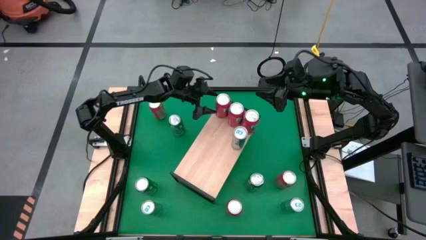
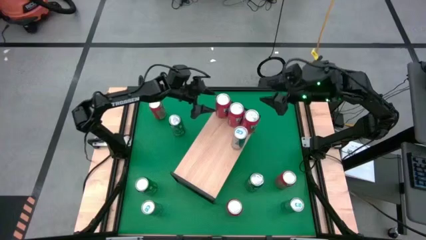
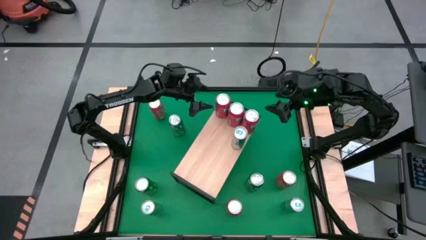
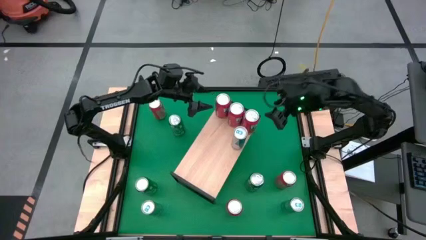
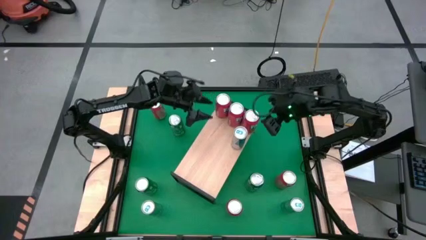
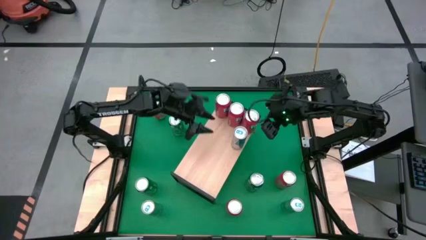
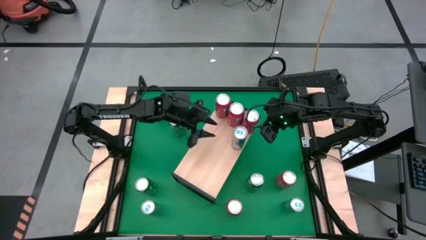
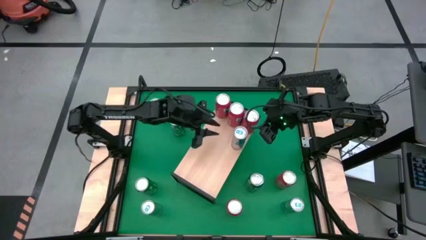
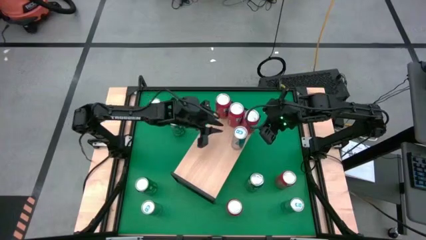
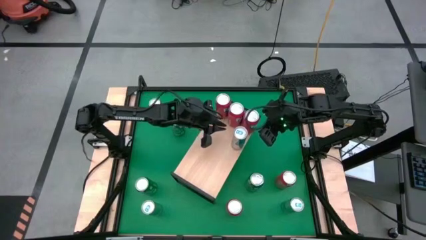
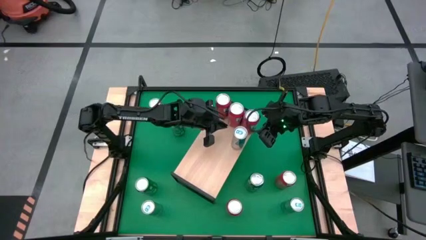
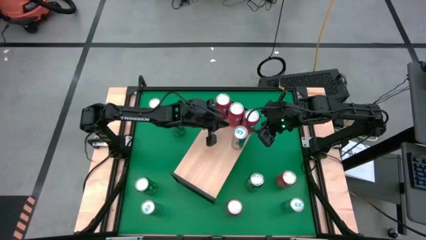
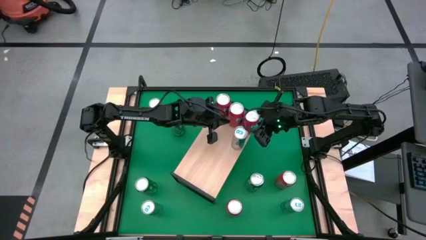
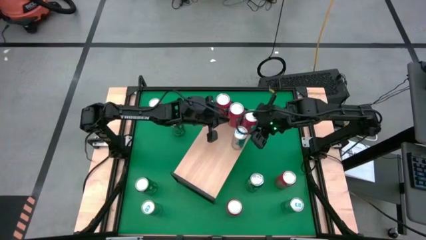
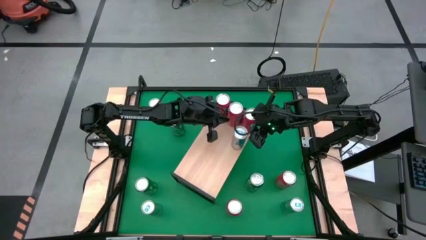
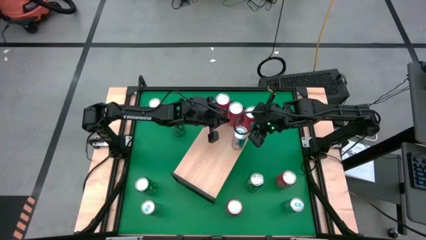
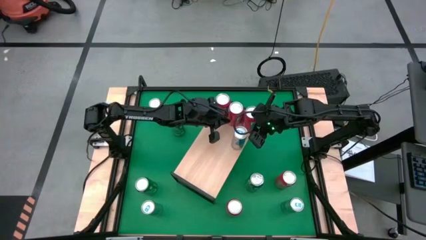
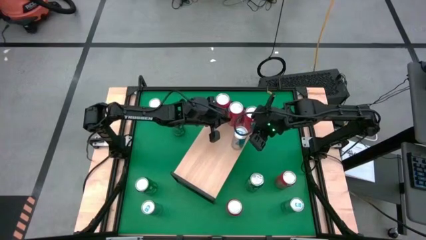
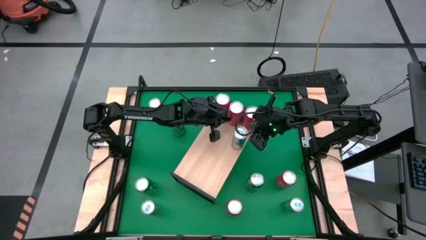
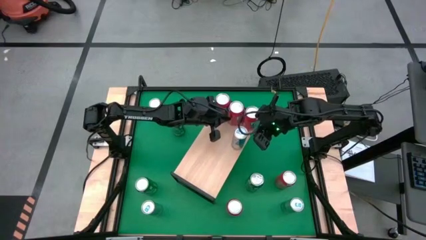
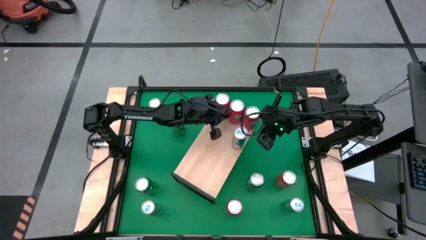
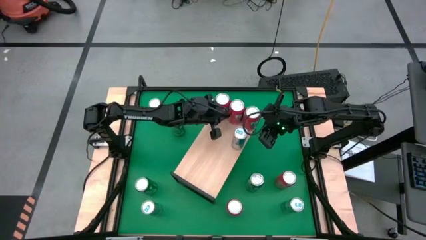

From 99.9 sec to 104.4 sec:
Task: Sort soda cans
Adjust the red soda cans on the shelf

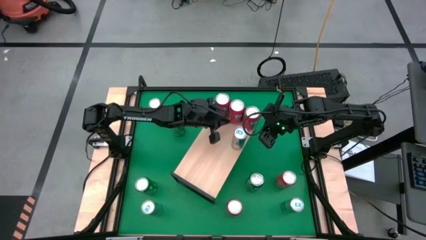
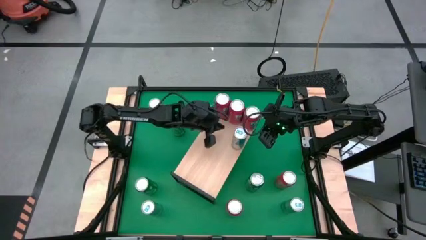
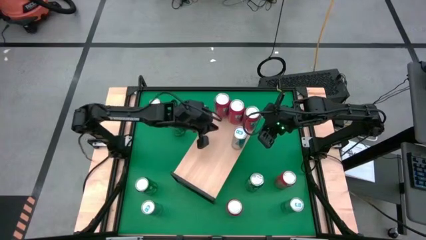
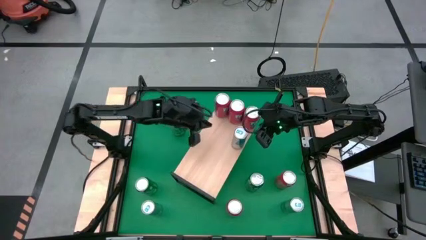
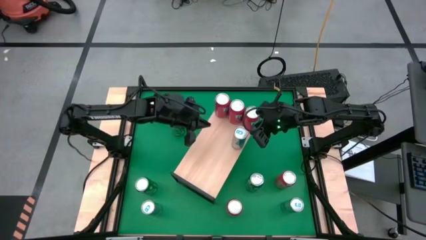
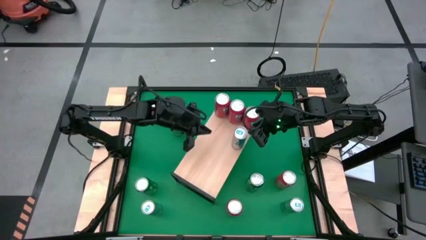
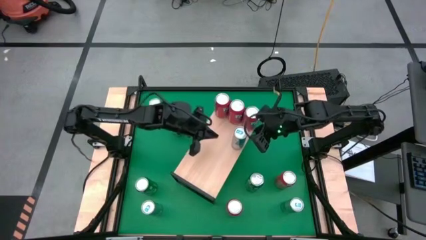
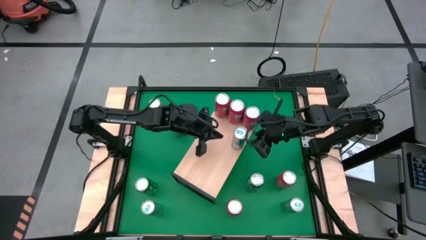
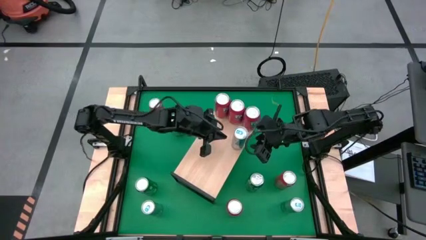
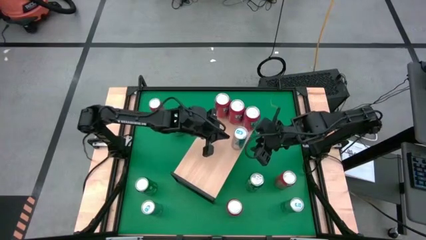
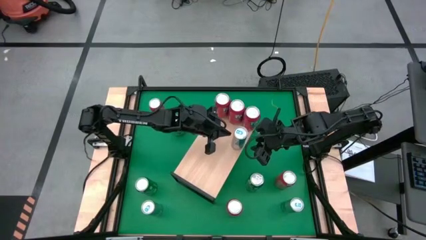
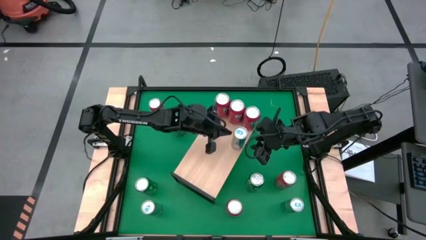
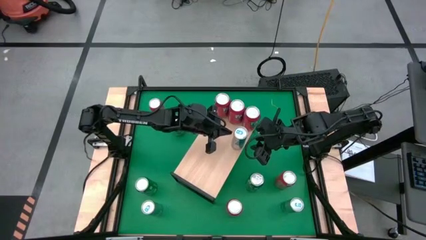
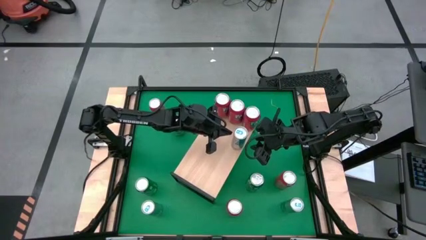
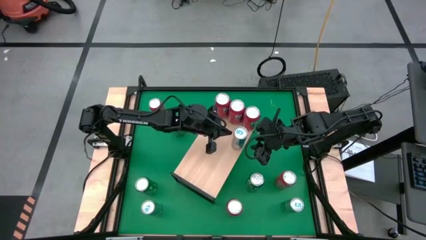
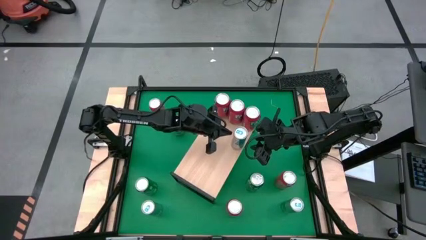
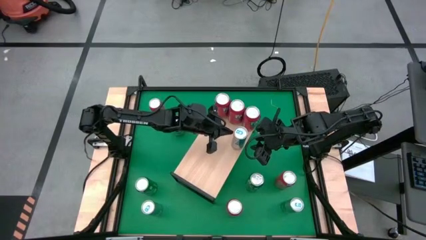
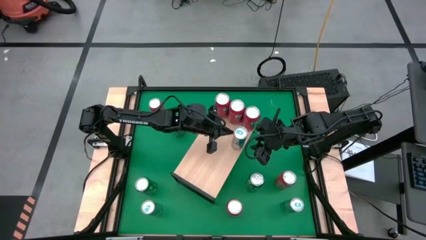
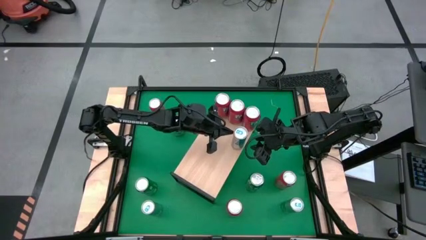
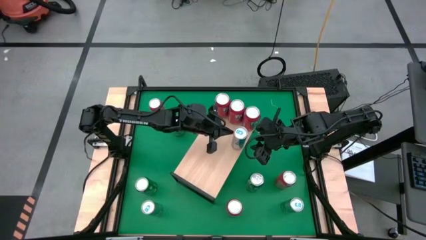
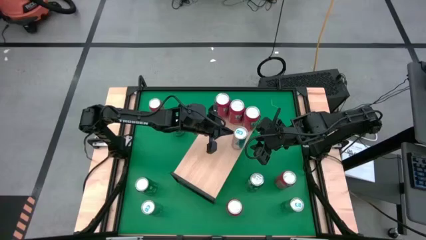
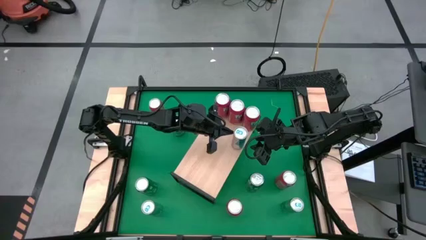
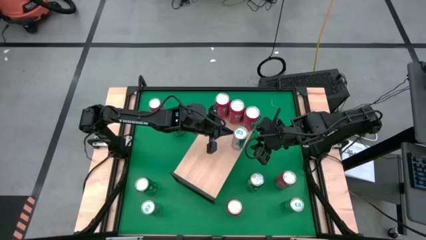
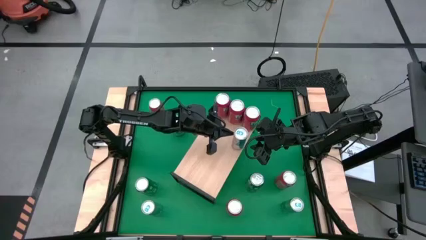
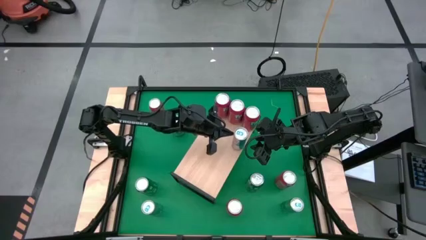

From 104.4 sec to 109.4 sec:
Adjust the blue soda can on the shelf

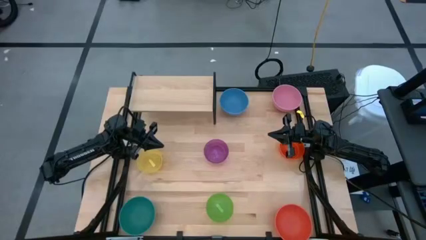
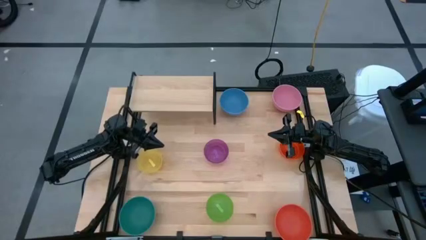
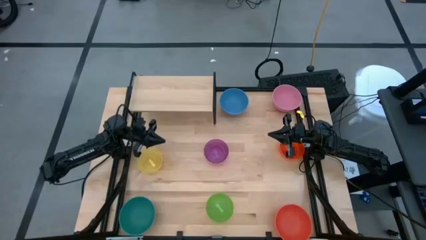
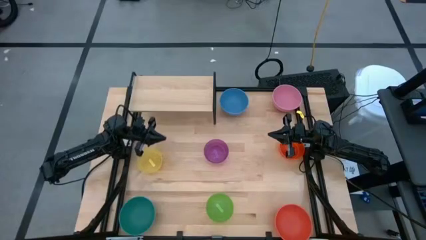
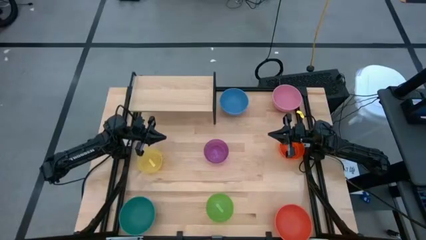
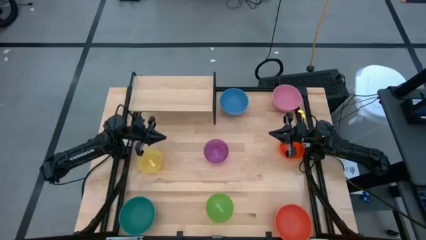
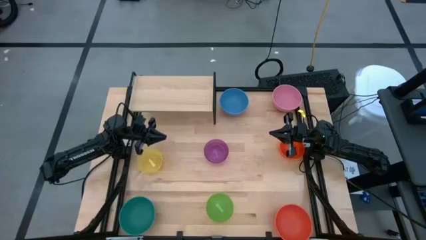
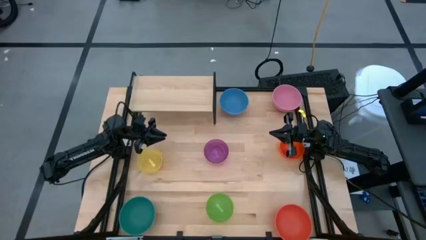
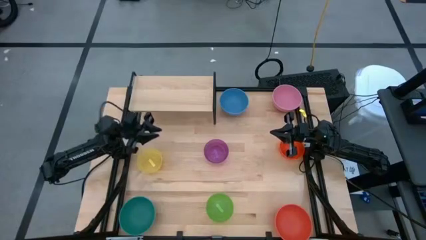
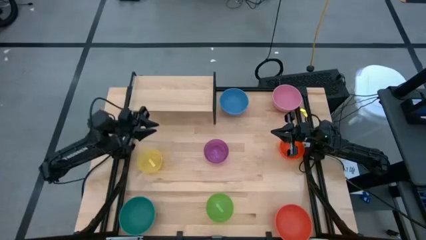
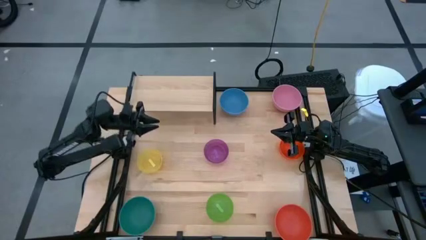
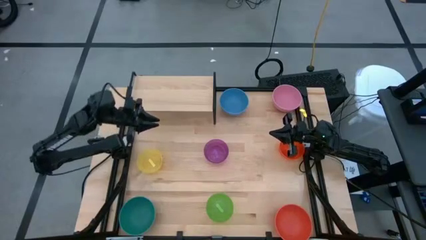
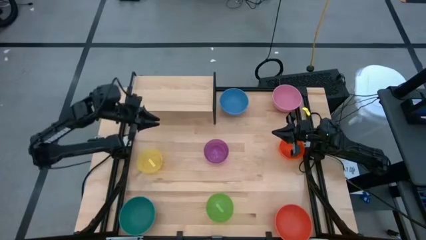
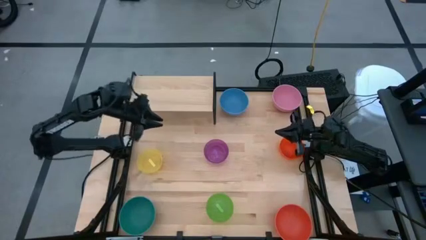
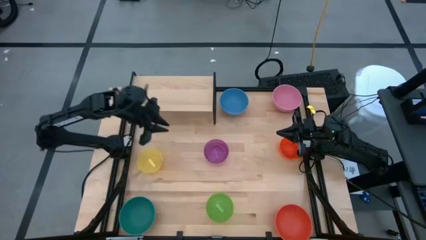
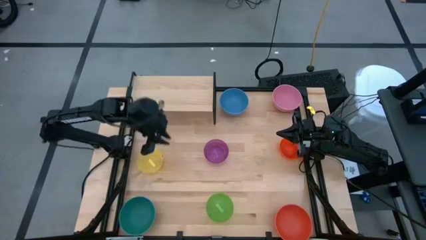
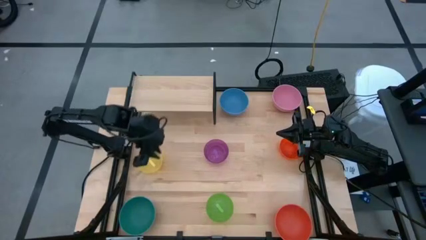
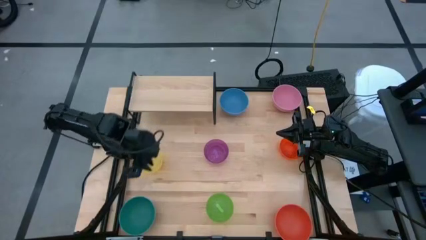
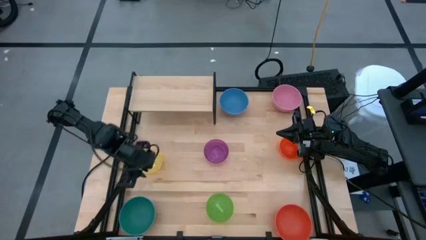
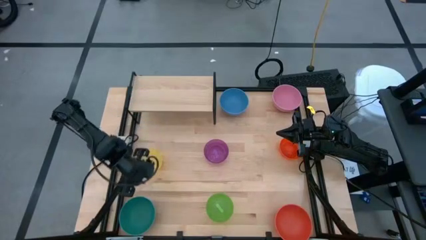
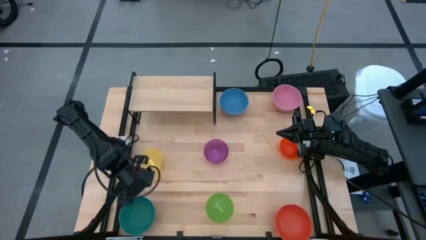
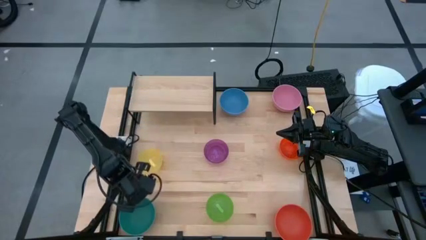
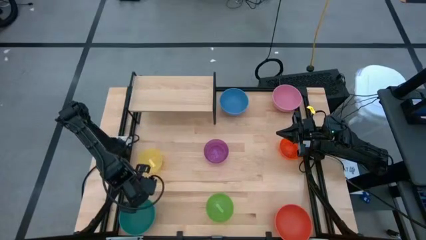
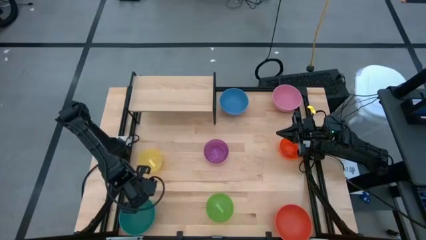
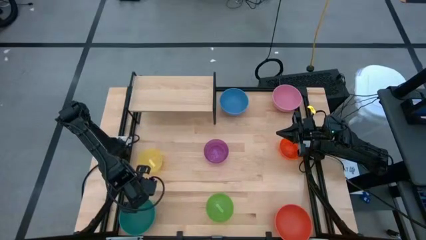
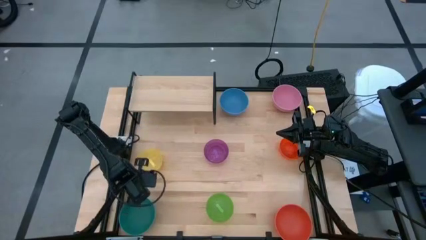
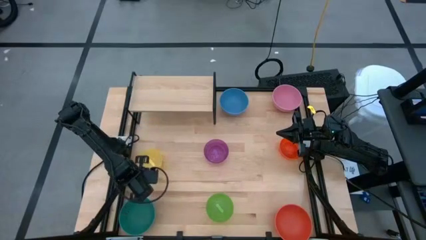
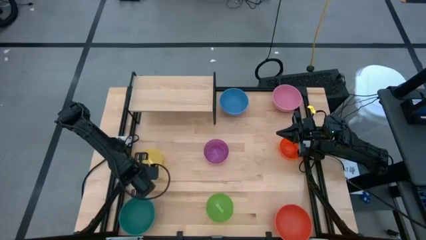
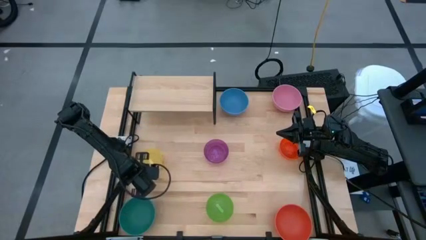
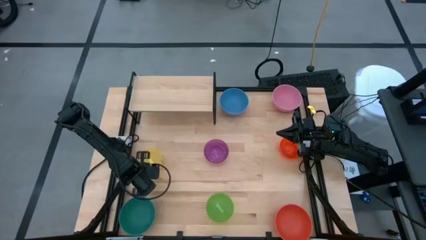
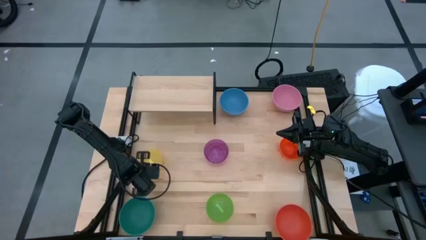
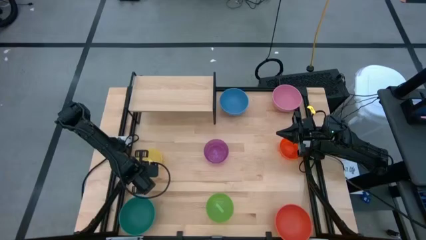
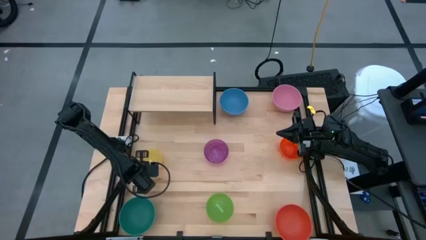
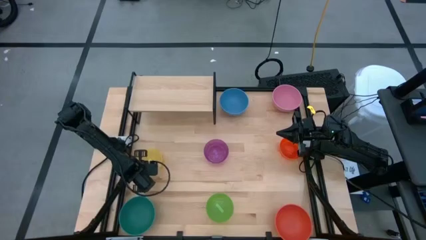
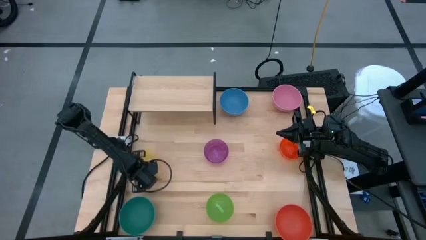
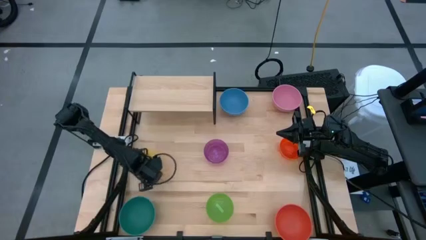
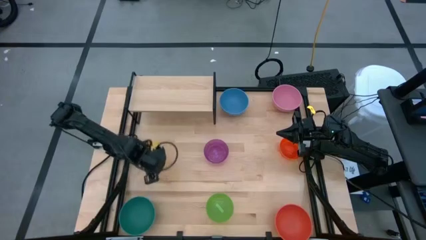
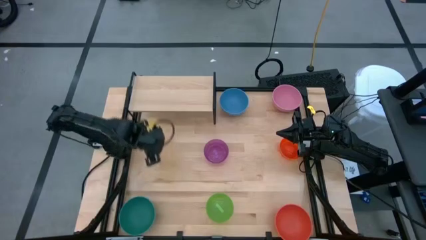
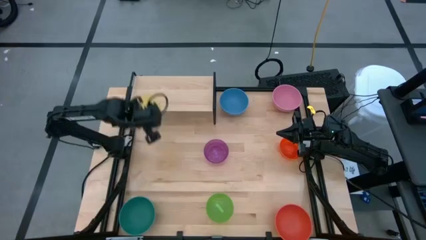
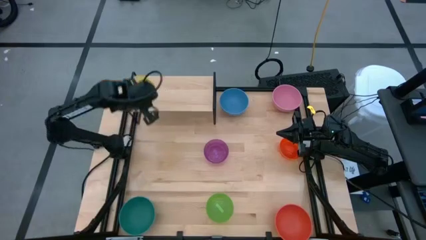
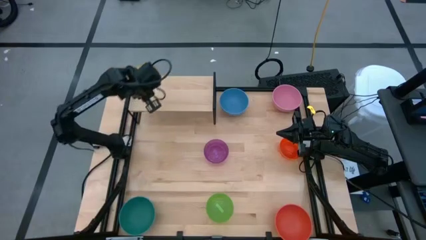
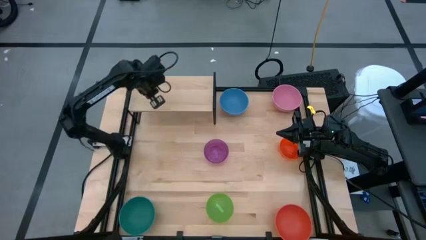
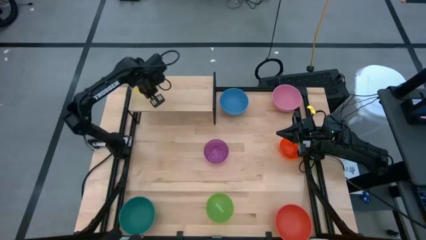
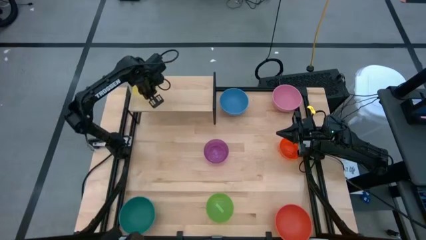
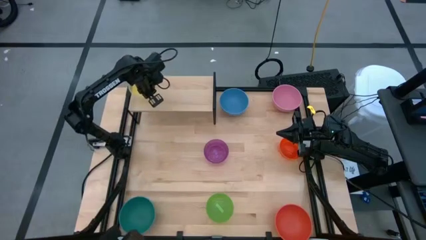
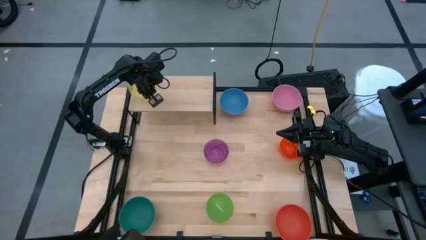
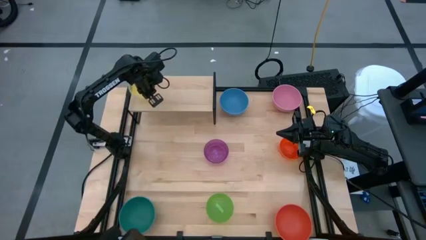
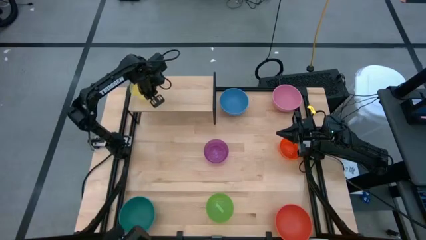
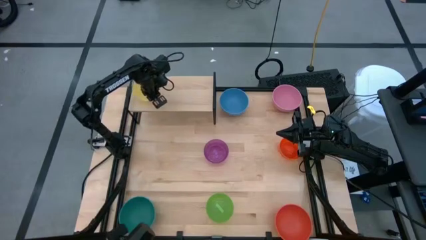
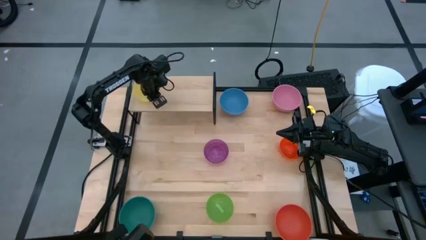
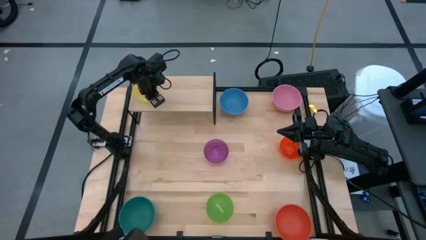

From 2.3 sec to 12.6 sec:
Task: Place and stack bowls onto a shelf
Put the yellow bowl on the shelf
